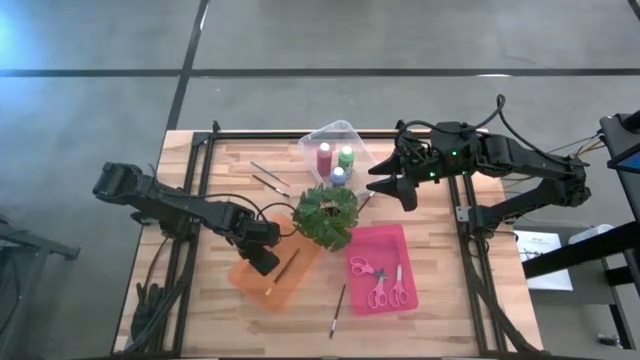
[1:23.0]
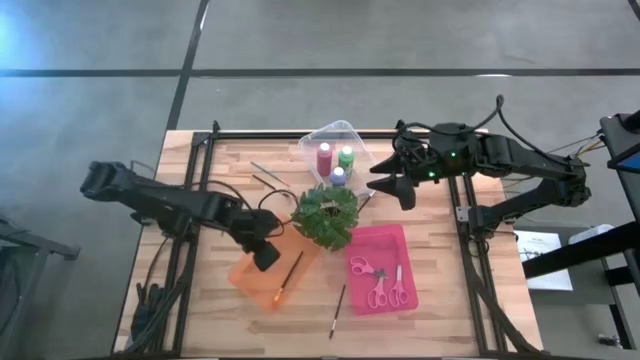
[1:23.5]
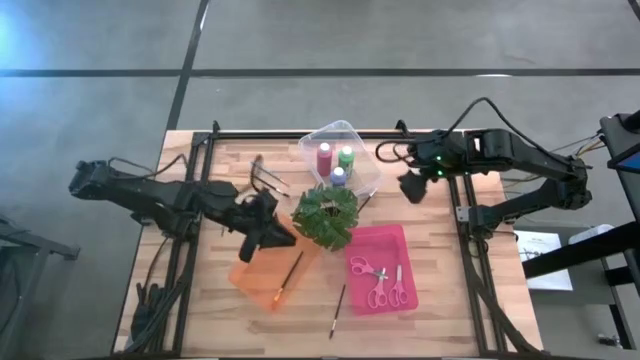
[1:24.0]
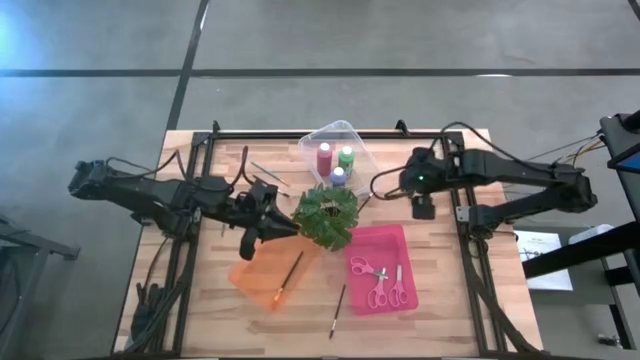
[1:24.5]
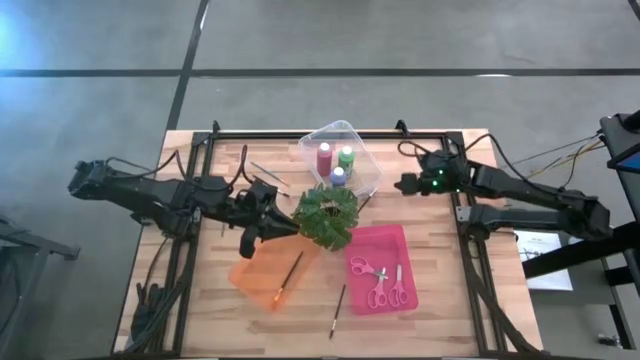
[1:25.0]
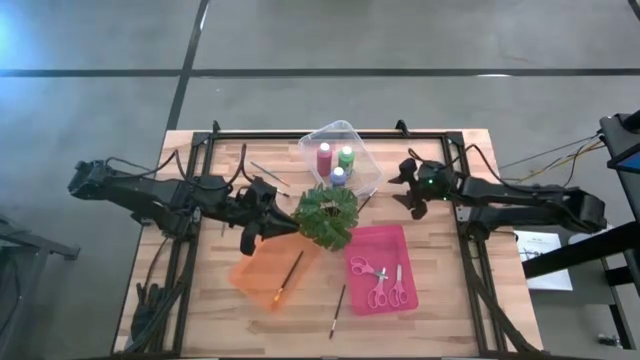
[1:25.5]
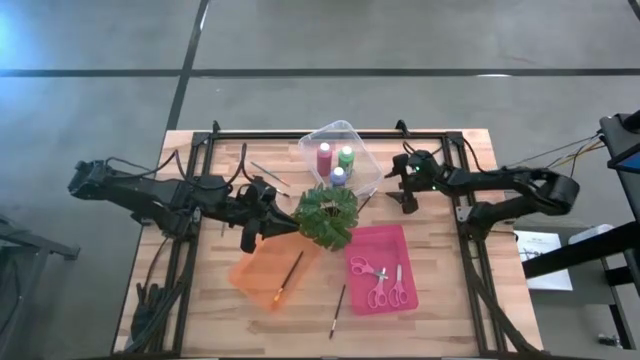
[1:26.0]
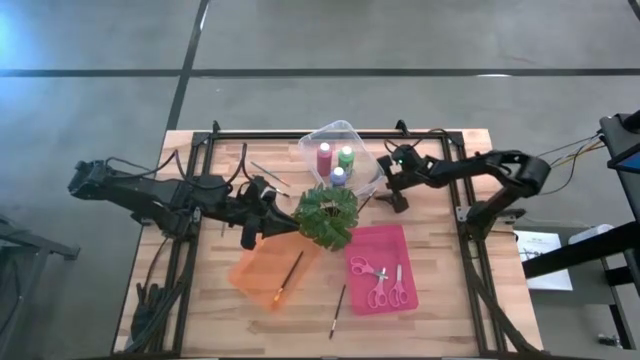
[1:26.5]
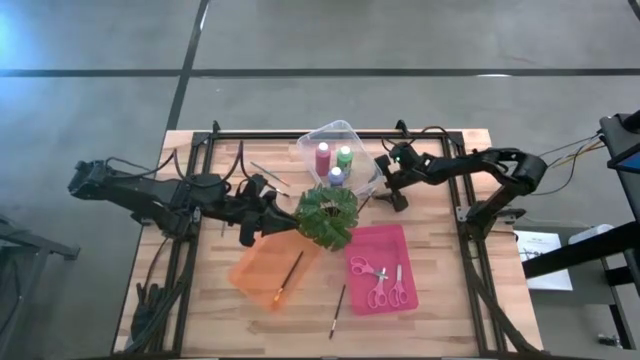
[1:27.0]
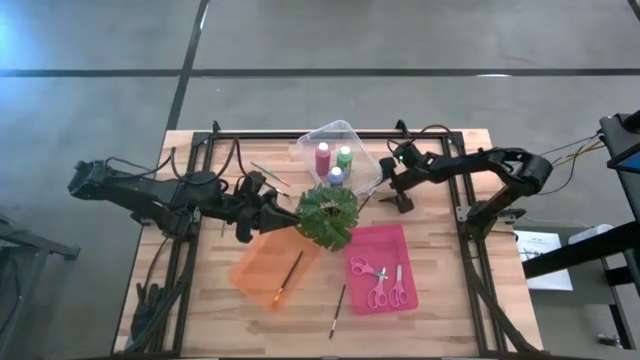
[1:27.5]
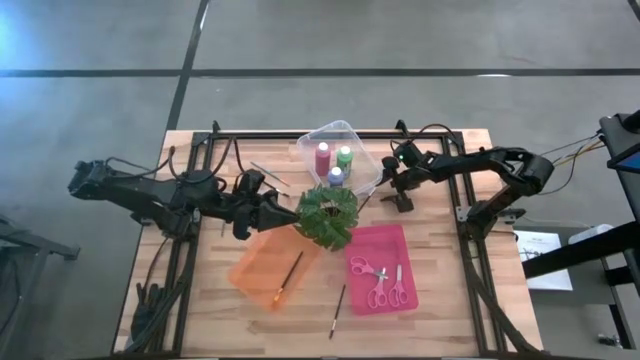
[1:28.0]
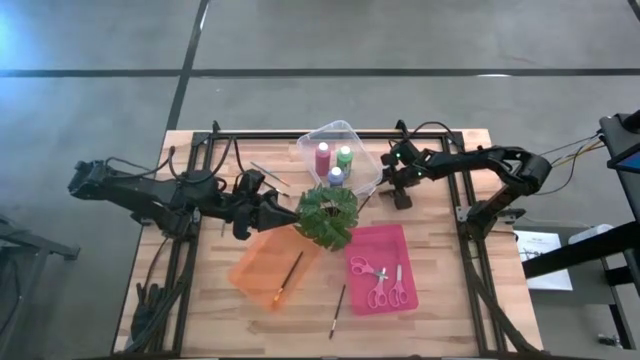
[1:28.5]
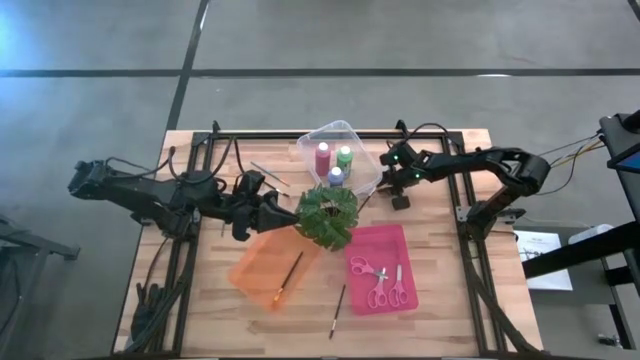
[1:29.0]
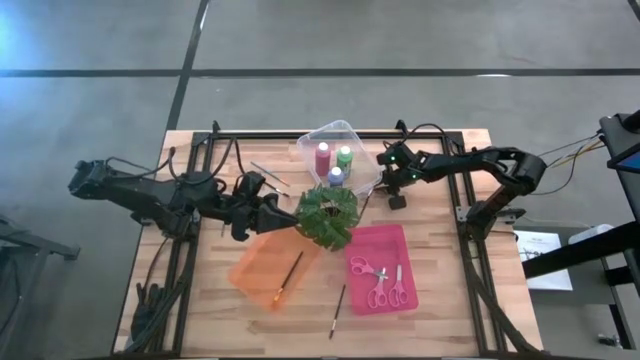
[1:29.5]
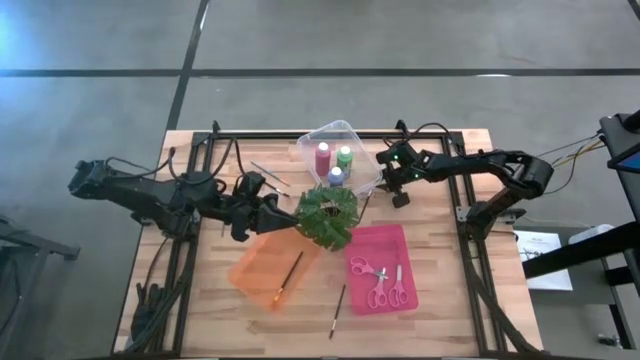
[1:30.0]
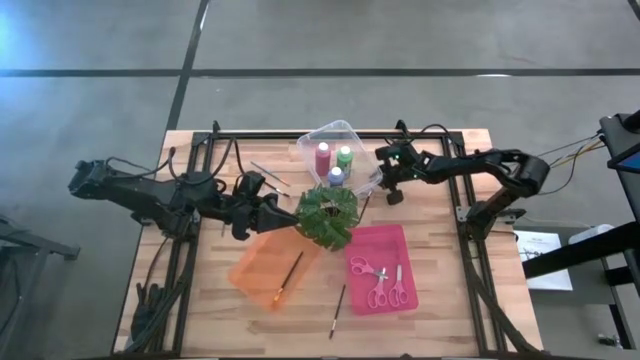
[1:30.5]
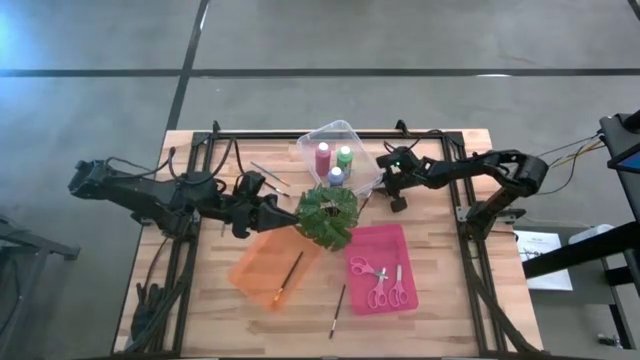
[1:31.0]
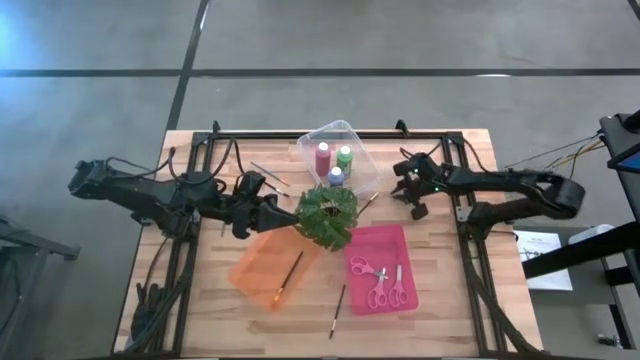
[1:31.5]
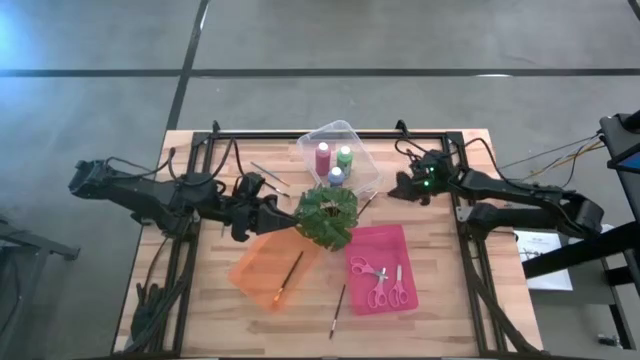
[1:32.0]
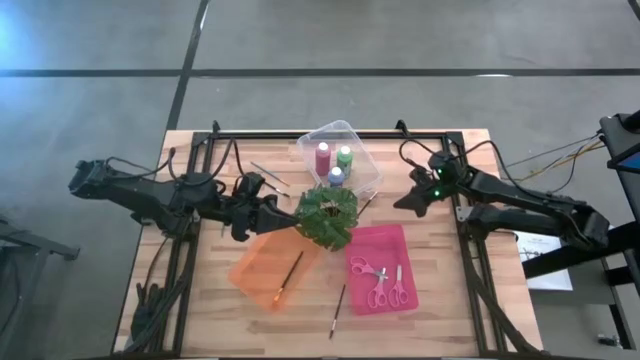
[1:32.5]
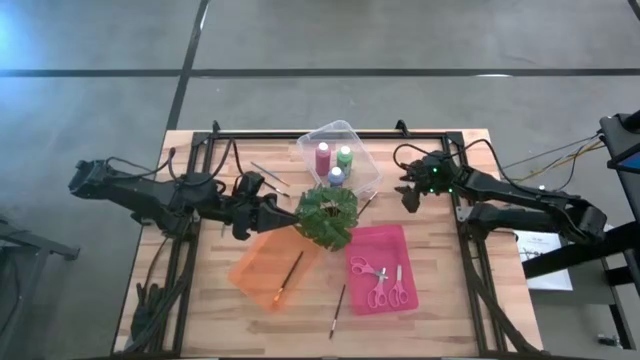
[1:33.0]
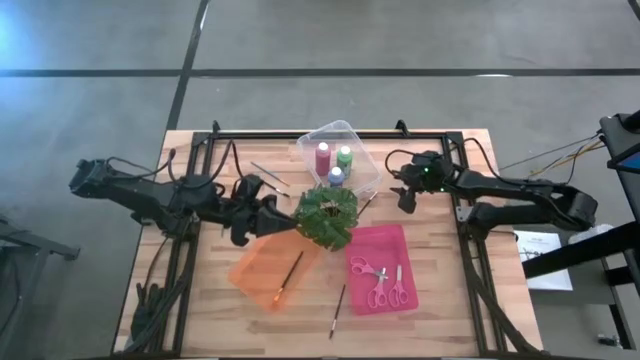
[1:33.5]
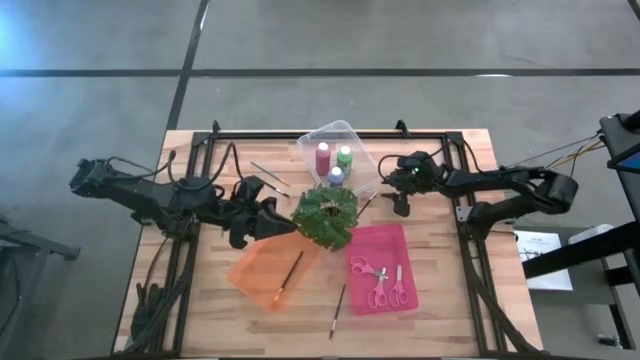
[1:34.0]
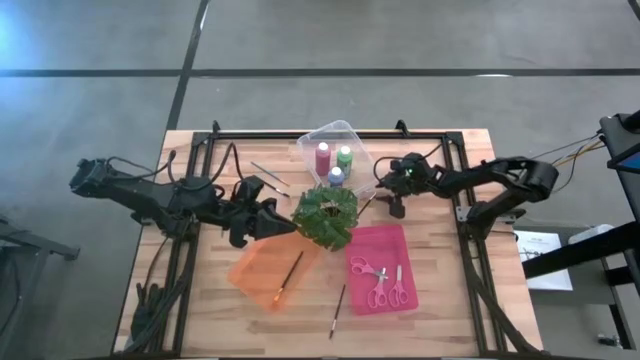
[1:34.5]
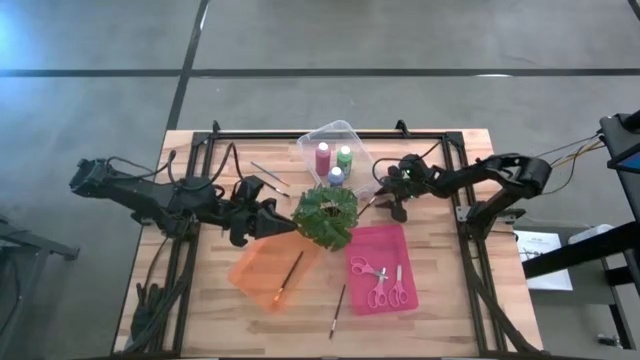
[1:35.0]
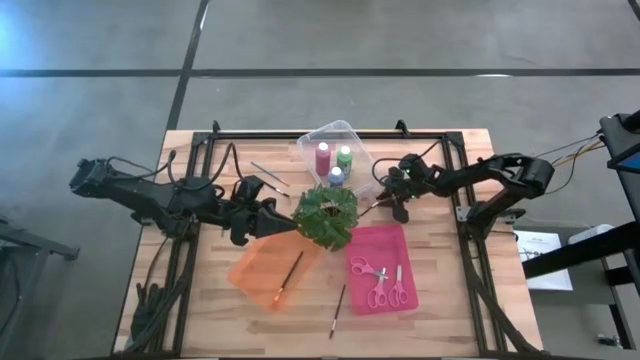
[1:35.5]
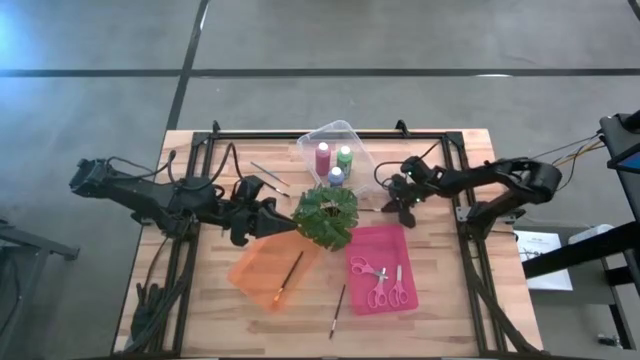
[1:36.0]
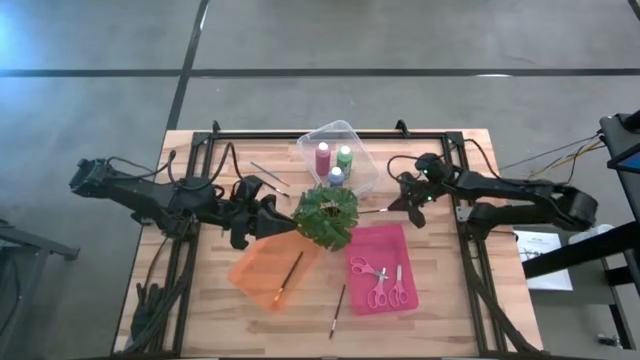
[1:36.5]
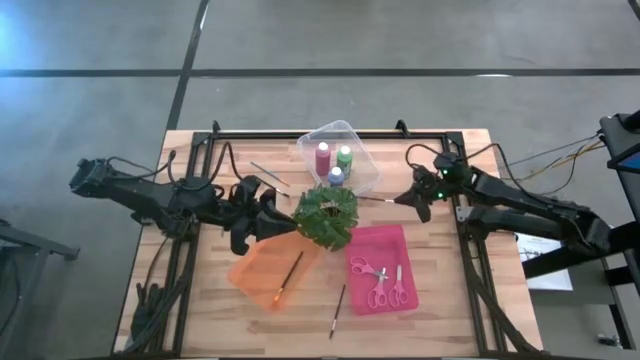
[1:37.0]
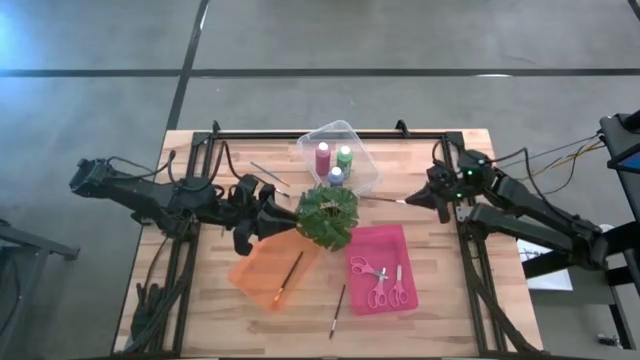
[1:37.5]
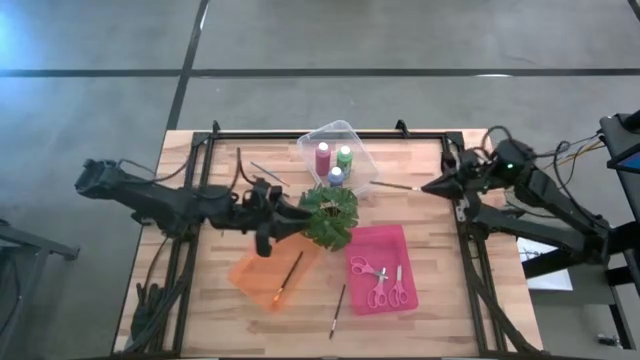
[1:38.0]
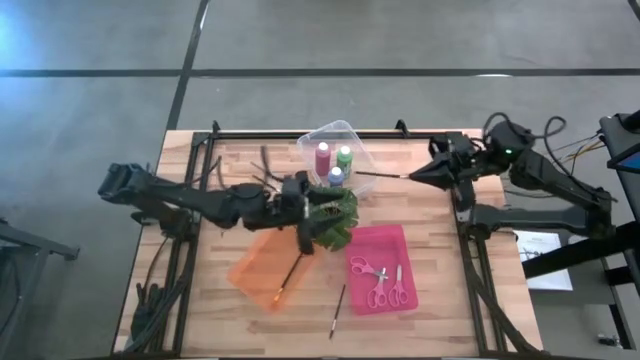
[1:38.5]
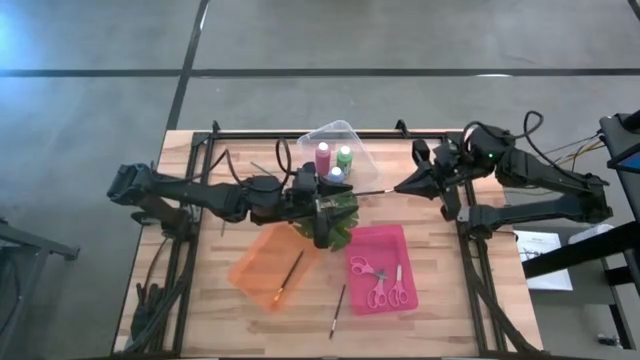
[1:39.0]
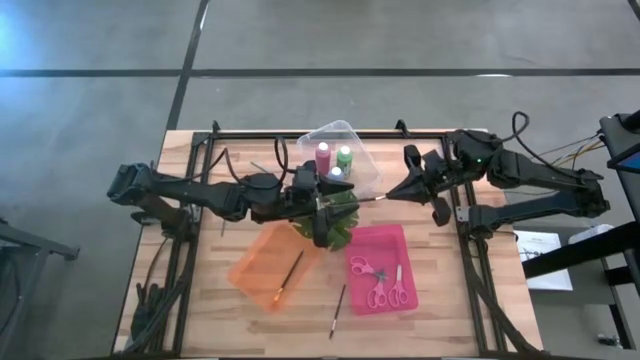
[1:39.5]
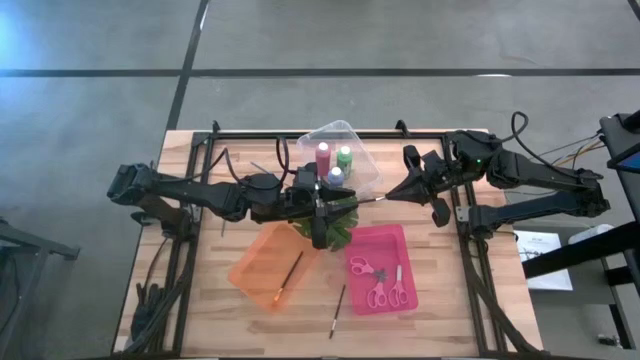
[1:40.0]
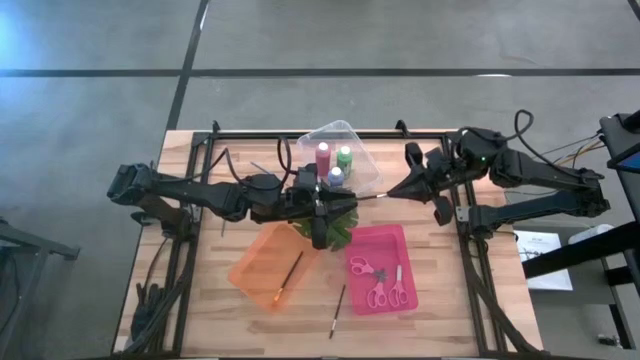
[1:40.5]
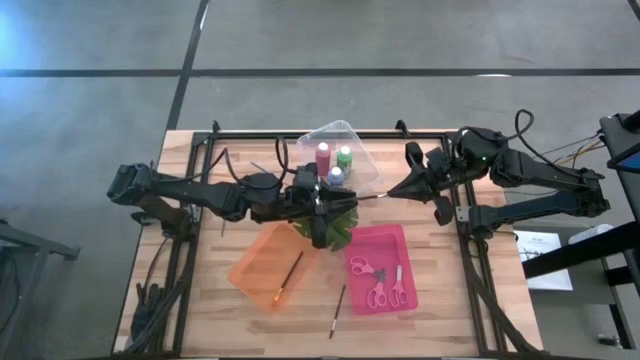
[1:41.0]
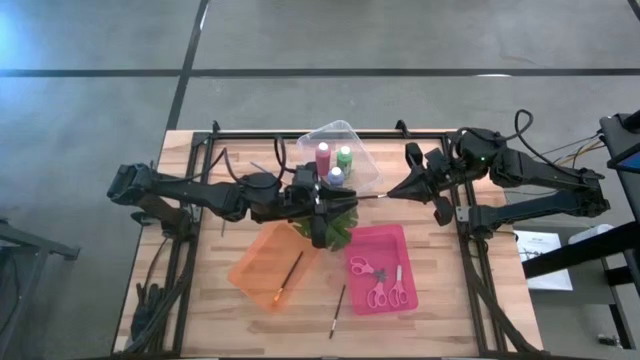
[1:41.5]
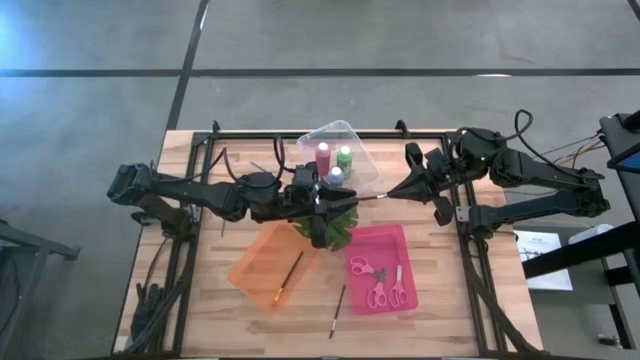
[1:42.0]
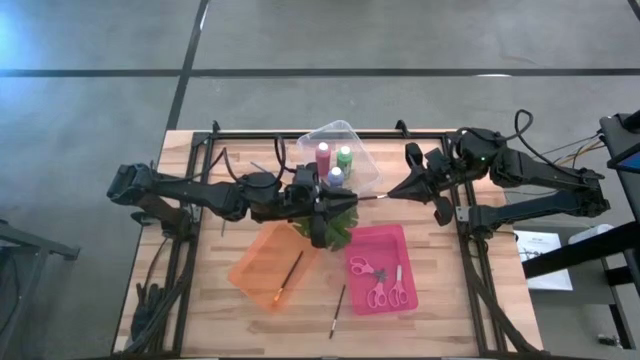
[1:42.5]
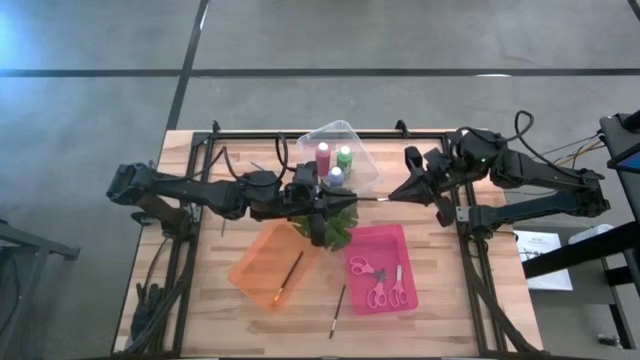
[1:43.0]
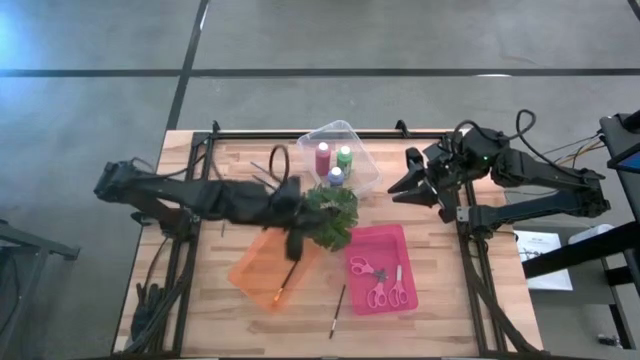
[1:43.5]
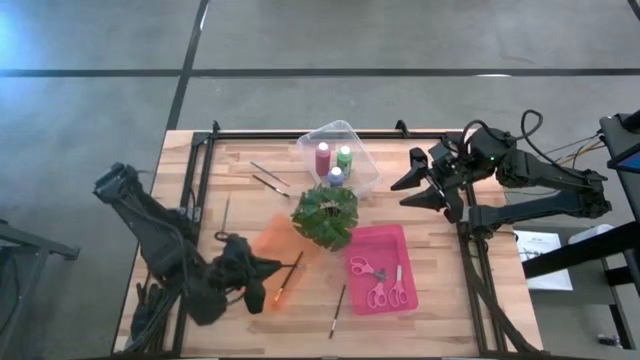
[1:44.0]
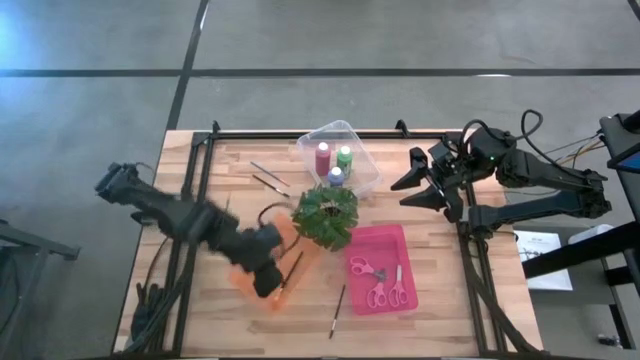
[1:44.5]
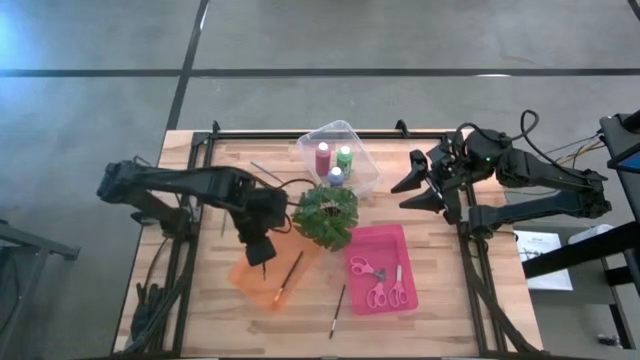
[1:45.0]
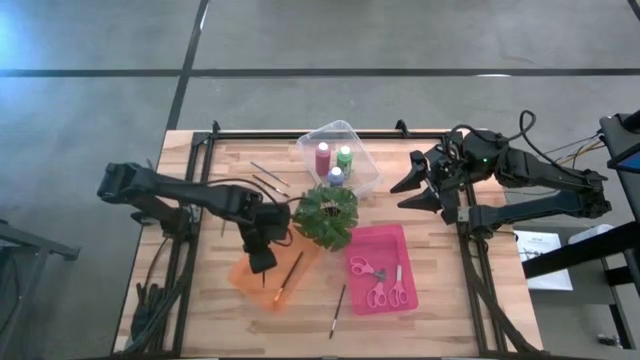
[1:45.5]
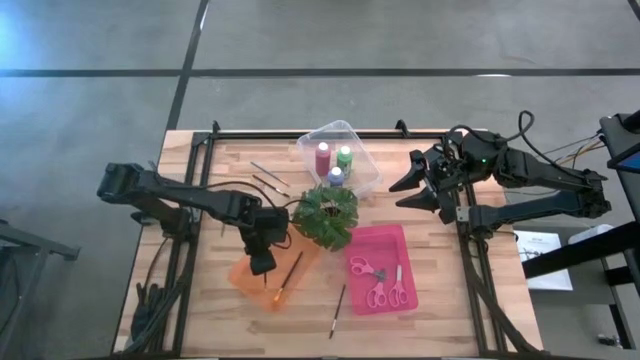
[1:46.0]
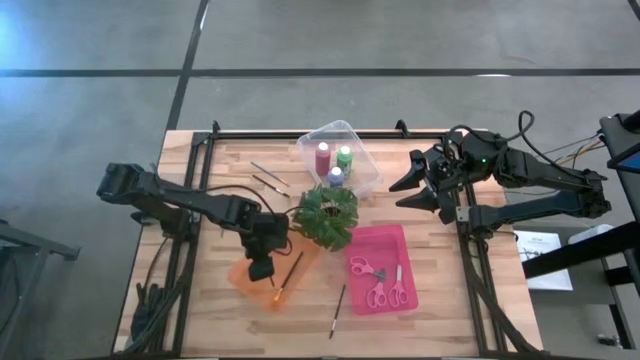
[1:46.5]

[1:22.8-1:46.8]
Task: Pick & Place Paint Supplies
Put the white eyeshadow brush into the orange bin
